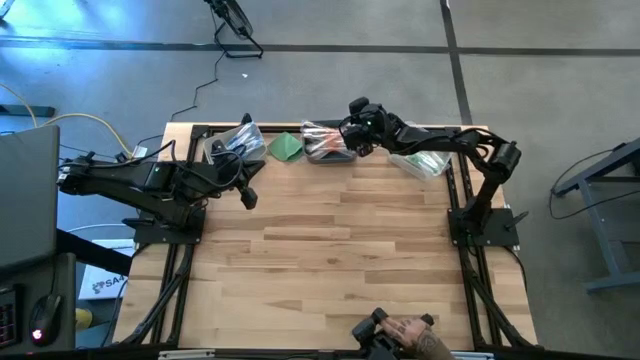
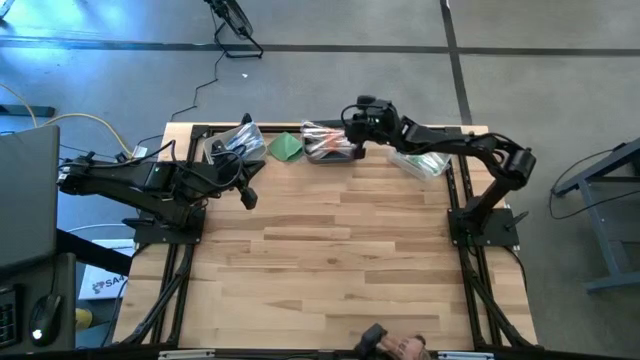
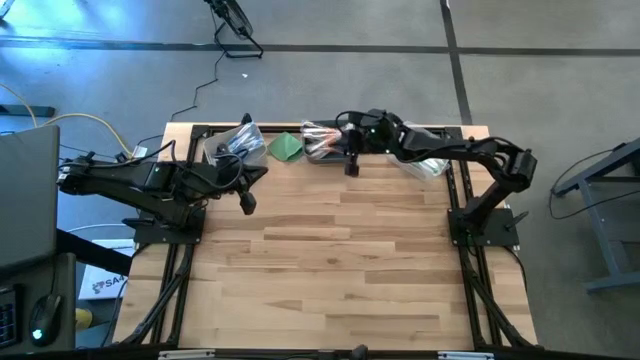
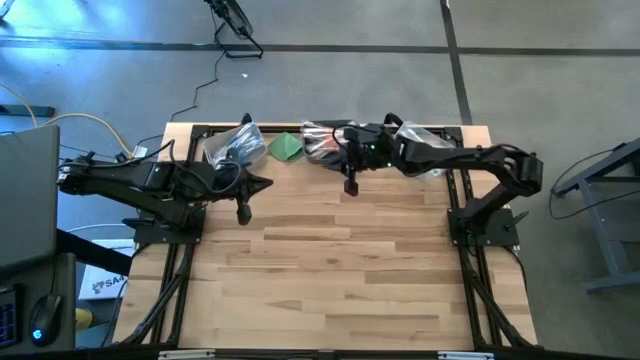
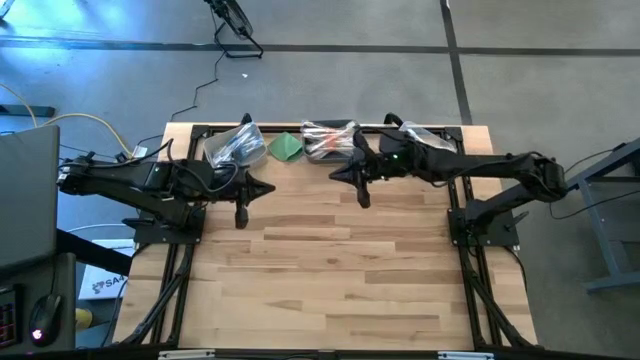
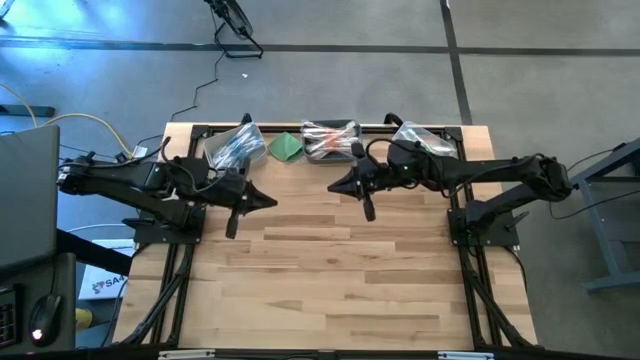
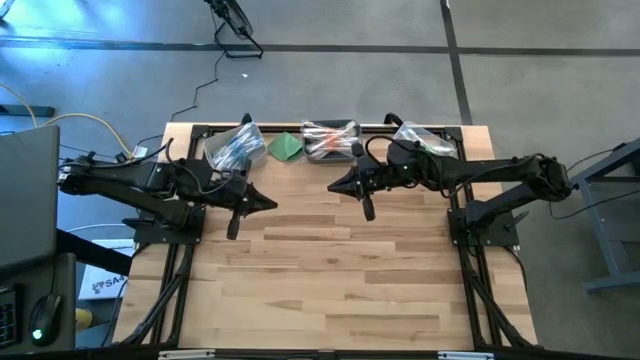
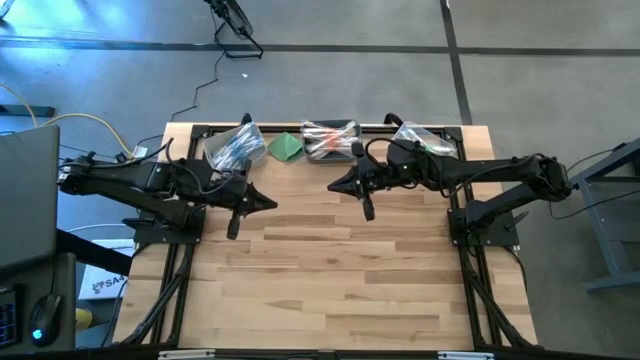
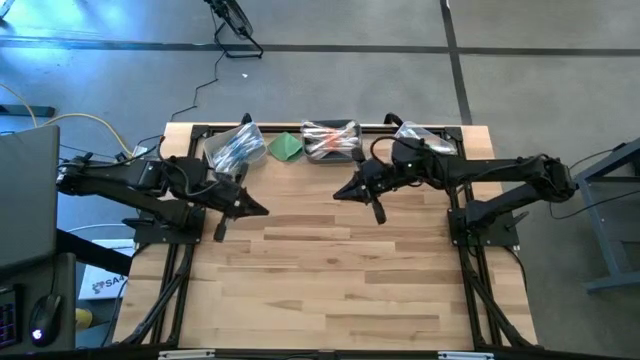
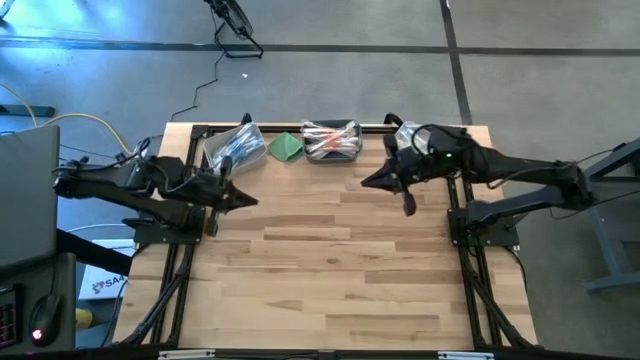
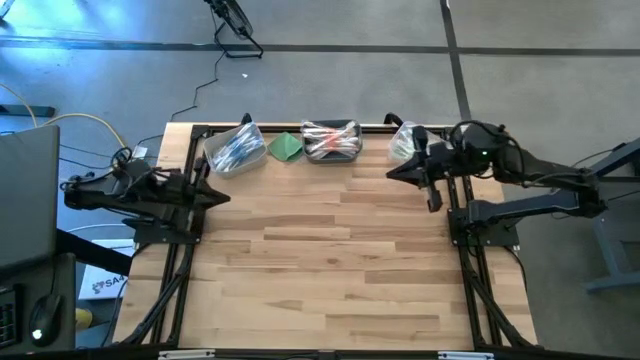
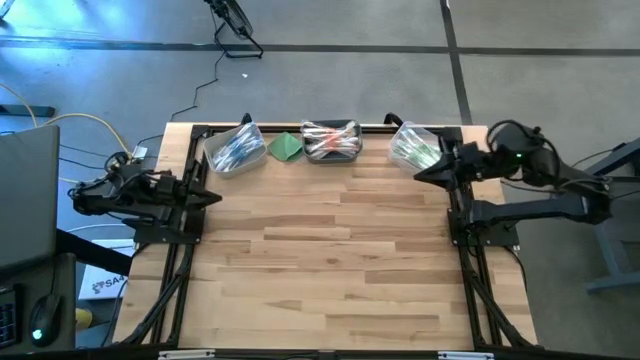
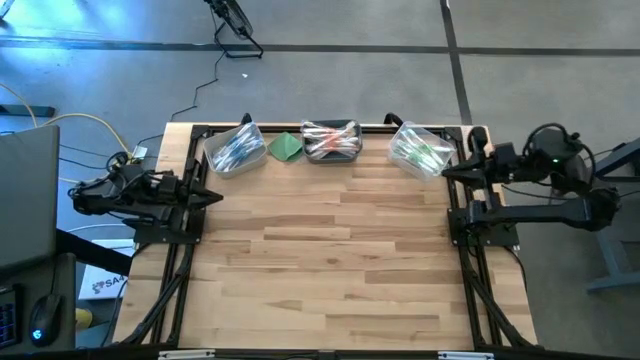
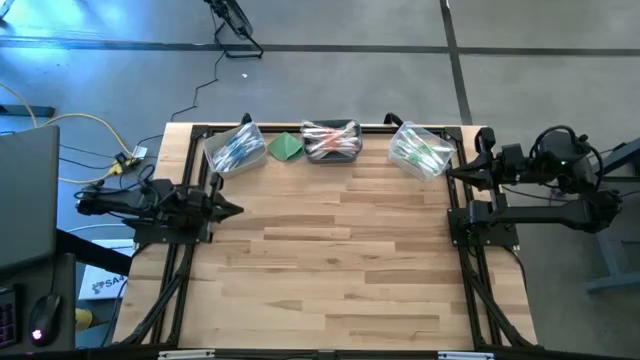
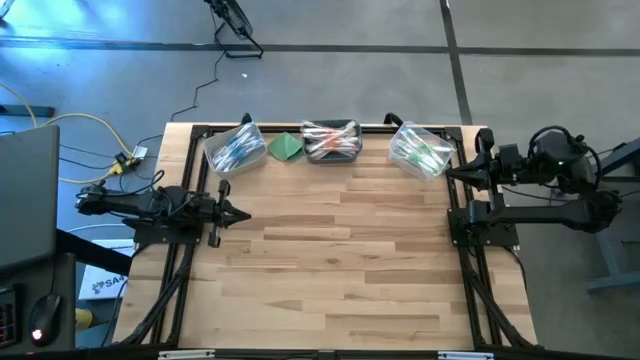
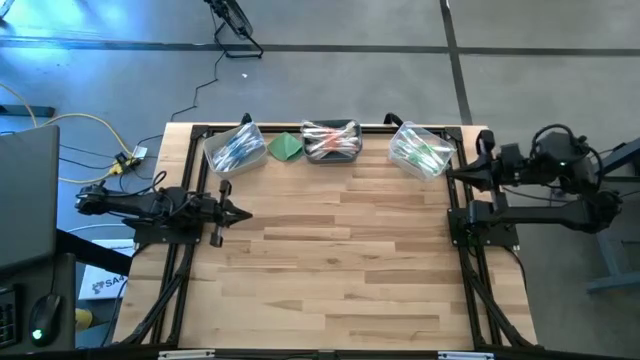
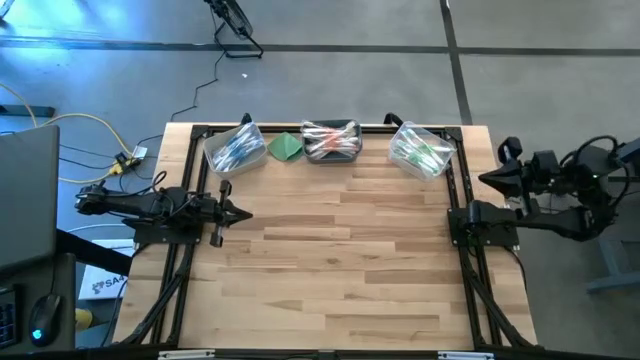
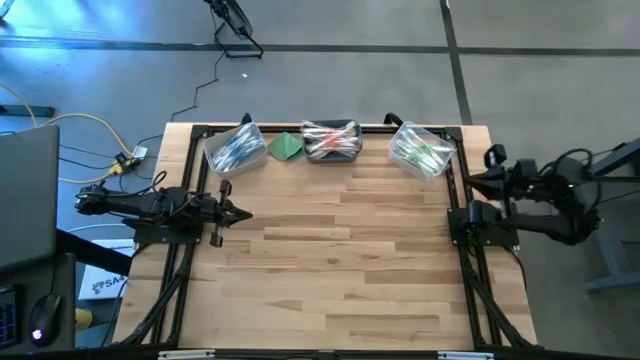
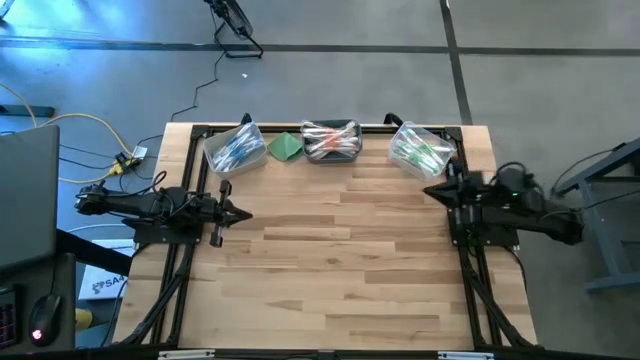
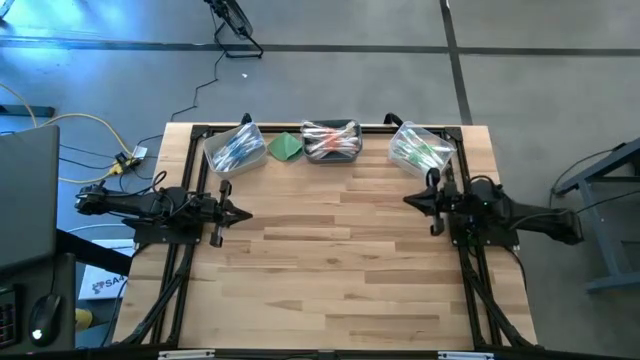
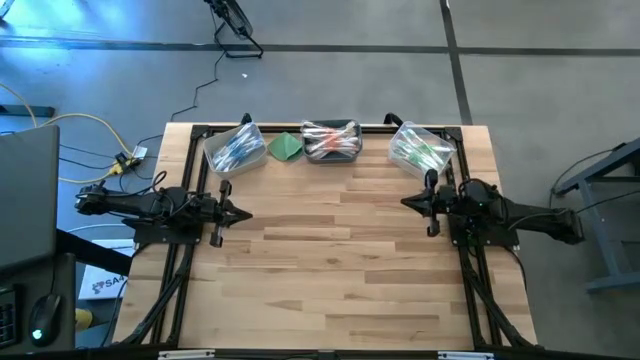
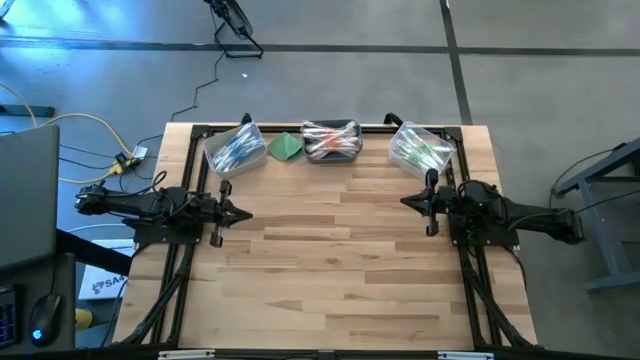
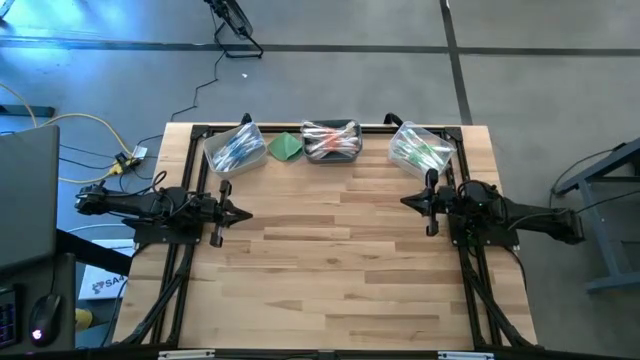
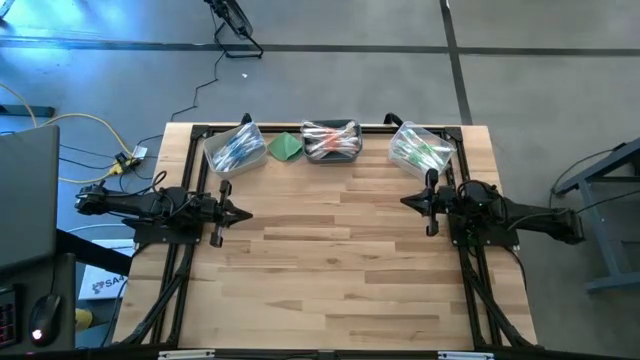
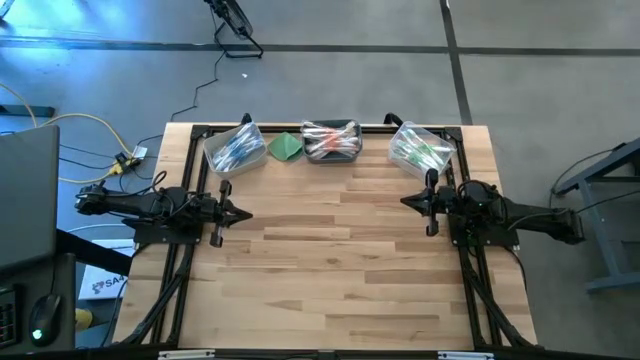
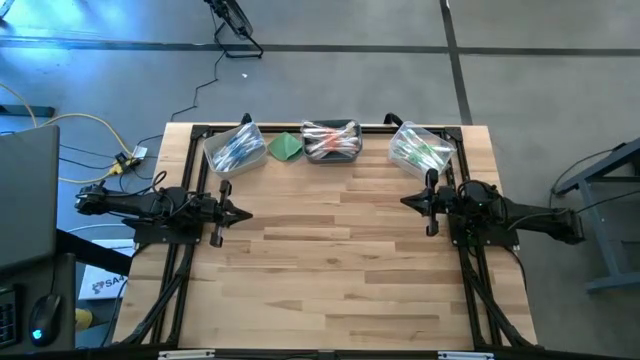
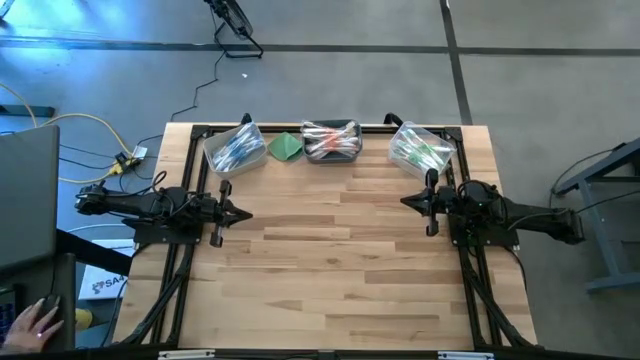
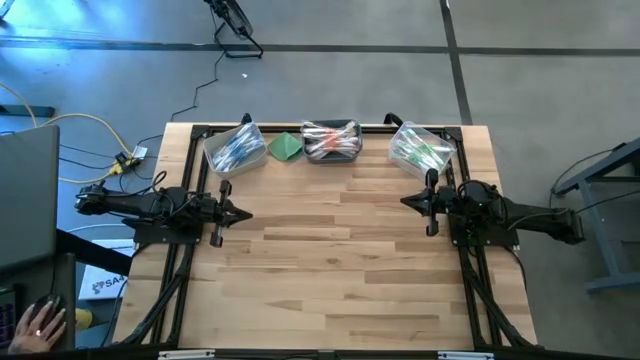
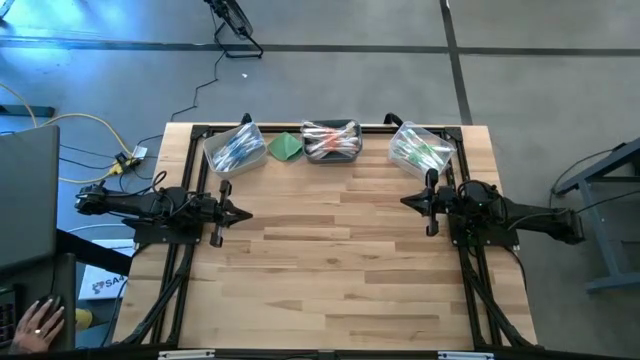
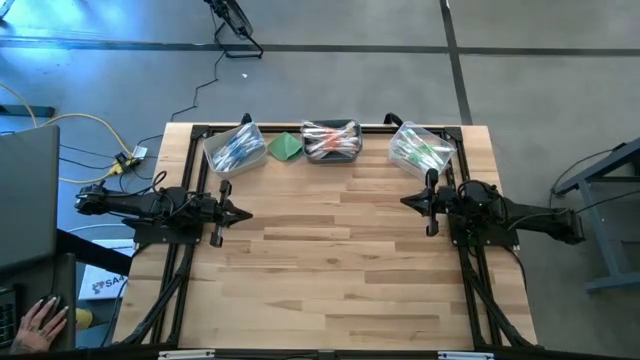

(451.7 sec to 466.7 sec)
Task: Pick & Place Toothbrushes
Return to Home Position

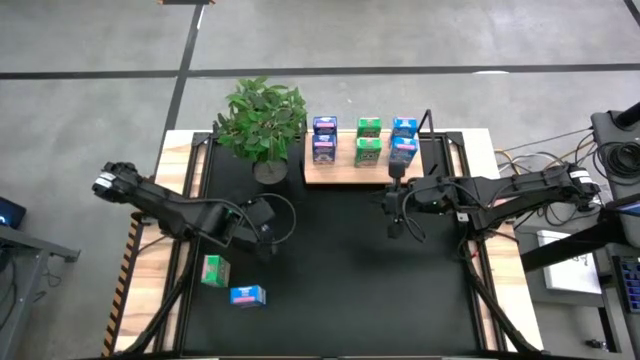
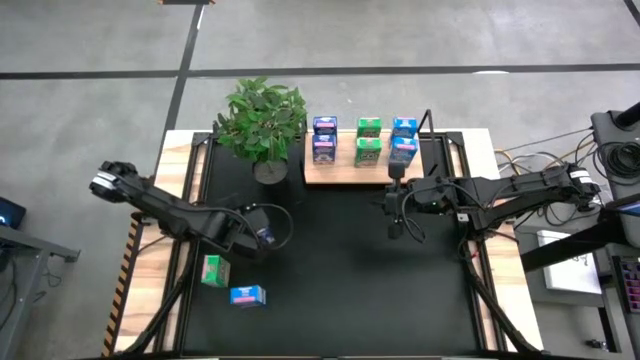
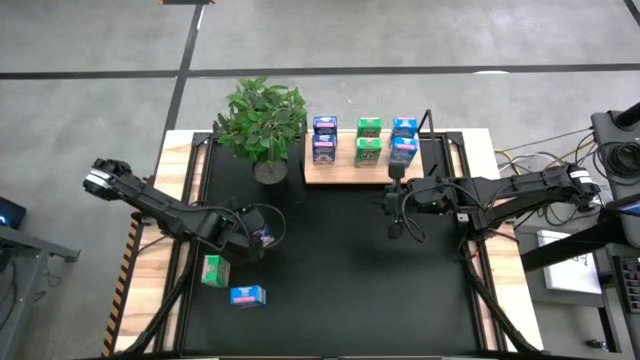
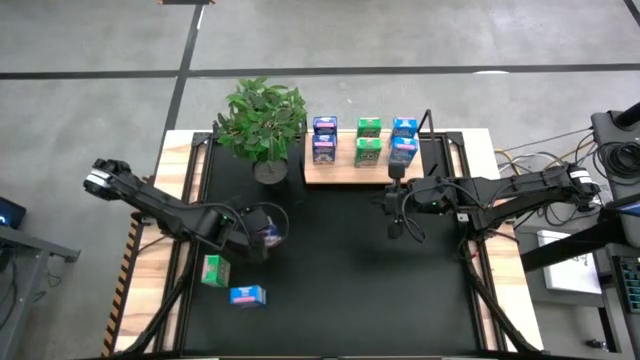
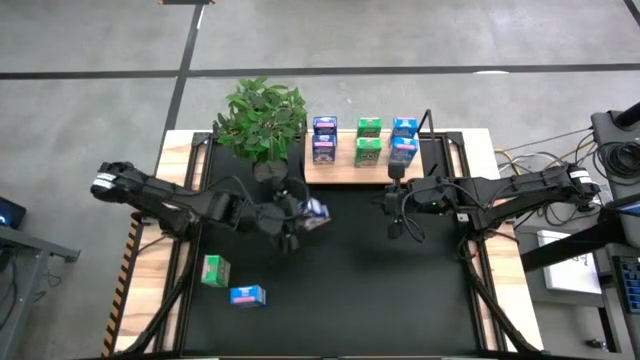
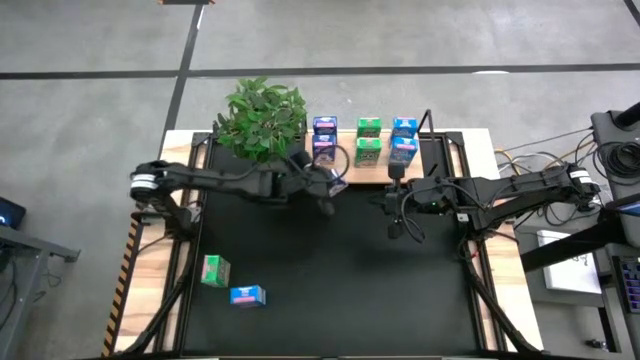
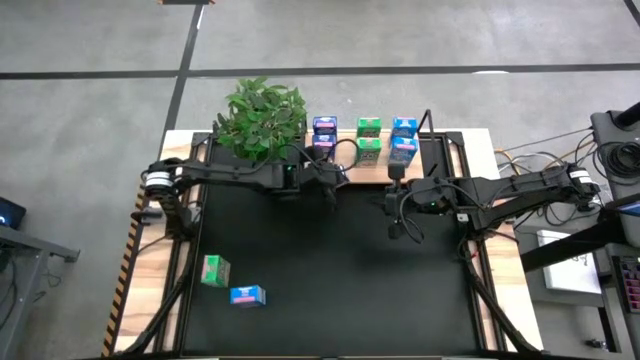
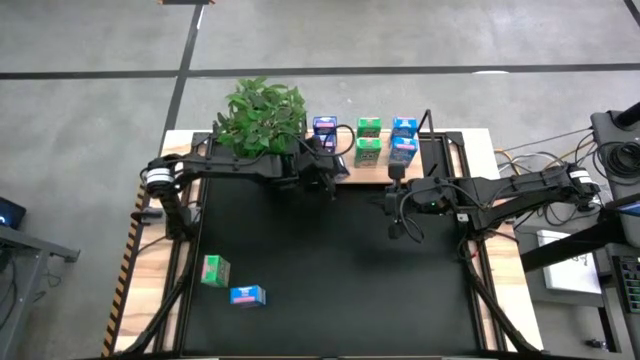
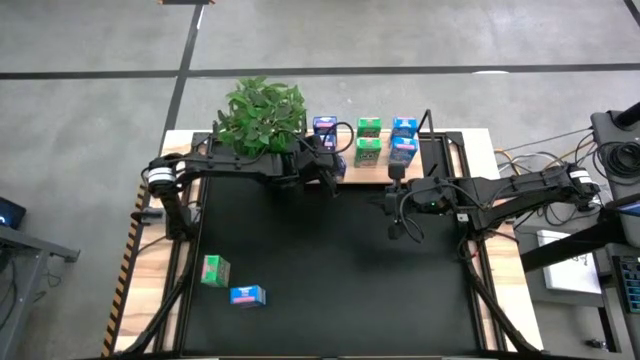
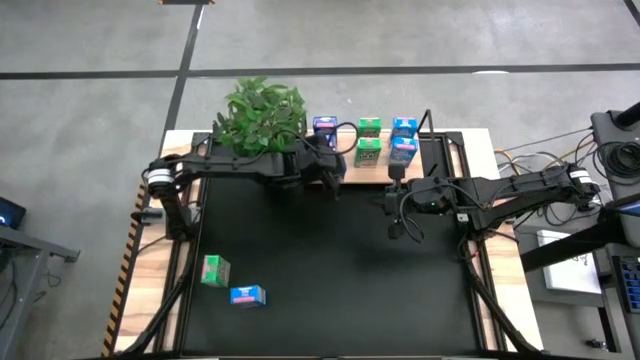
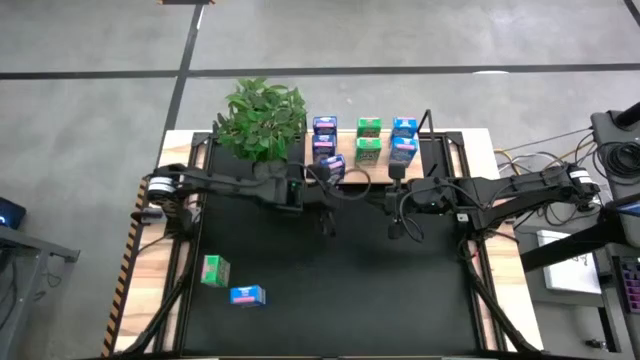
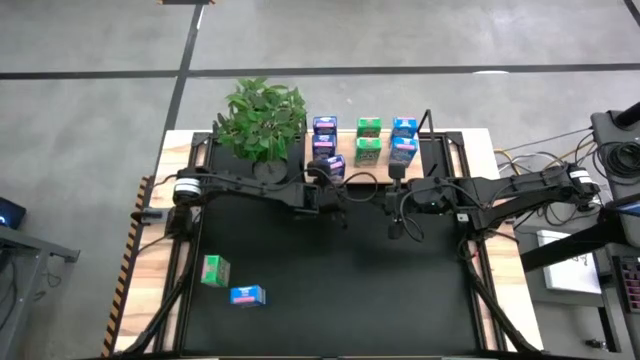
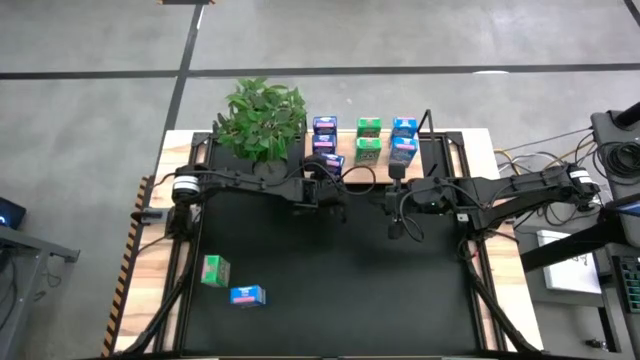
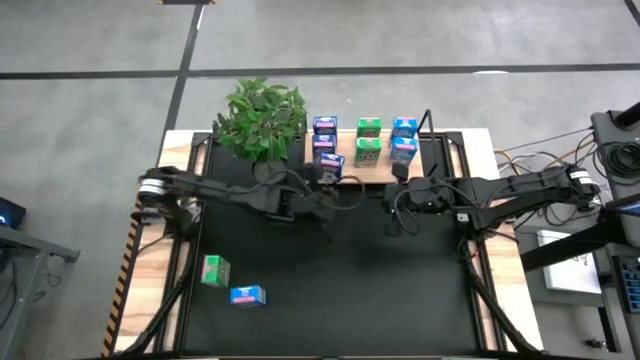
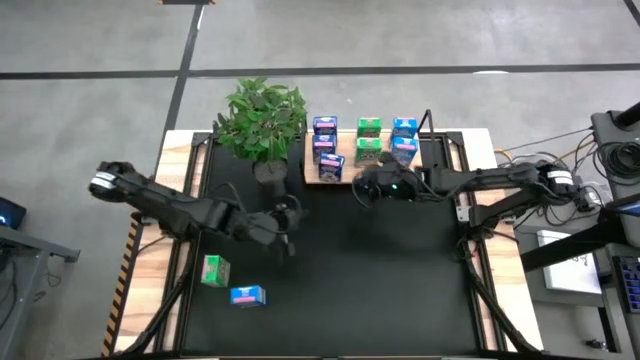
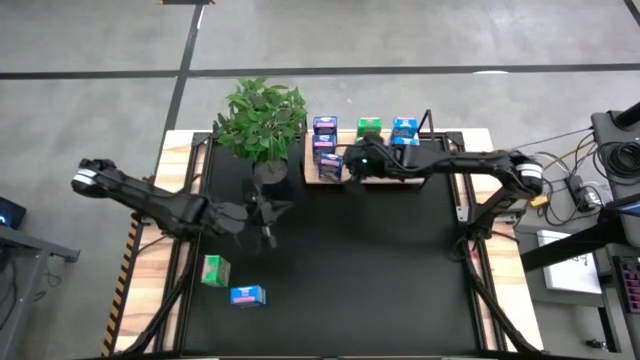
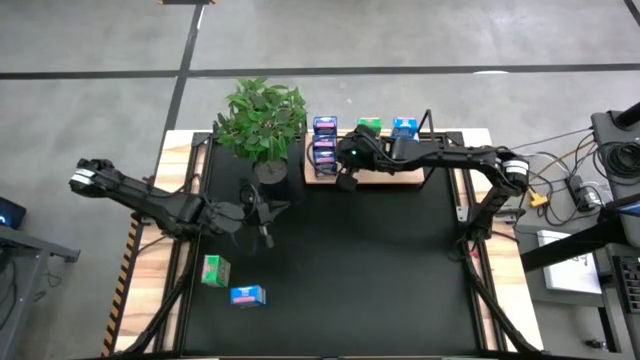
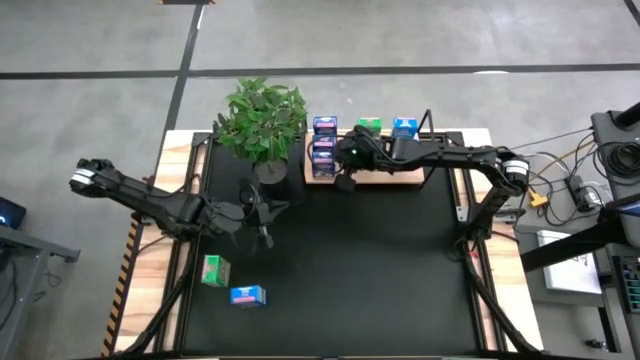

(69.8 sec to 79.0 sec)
Task: Stack cereal on shelf
Put the dark blue cereal box on the shelf aligned with the other dark blue cereal boxes
